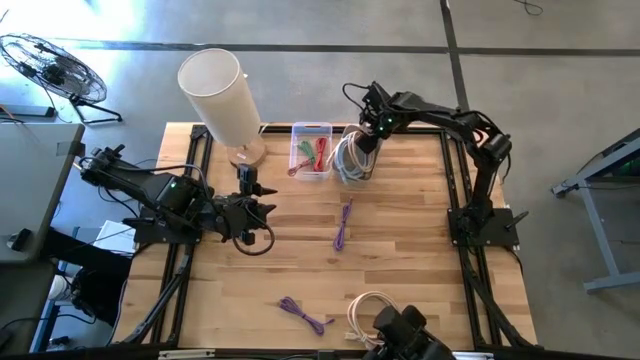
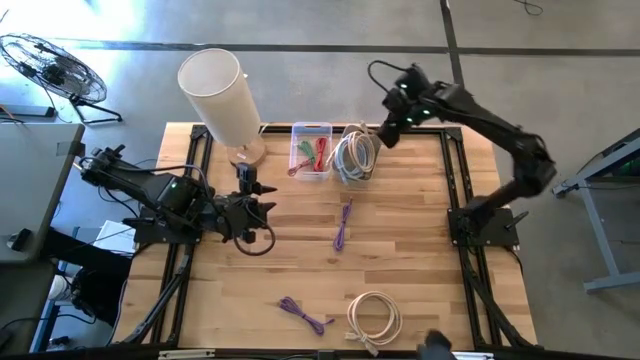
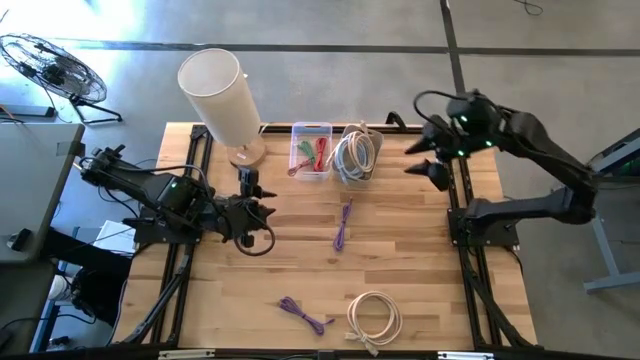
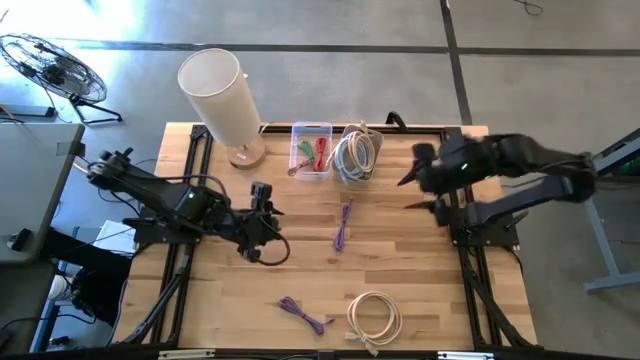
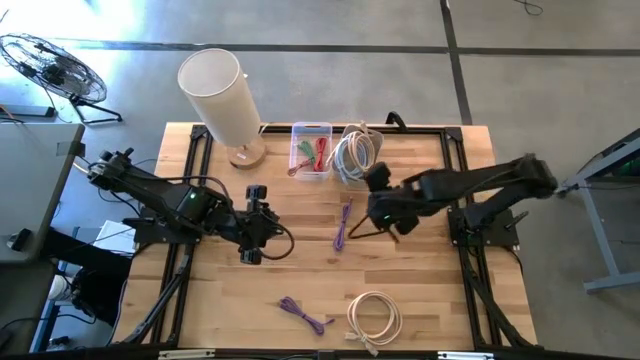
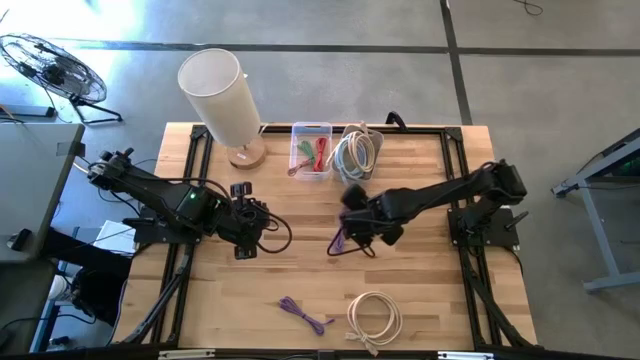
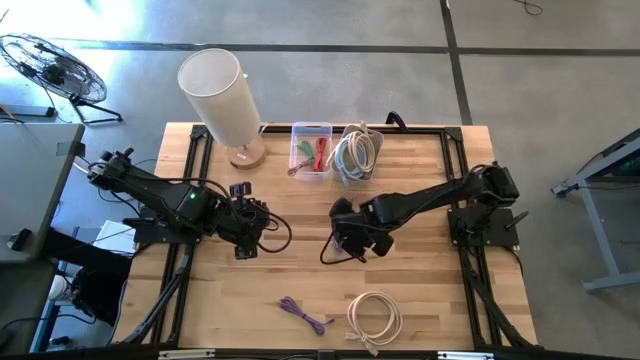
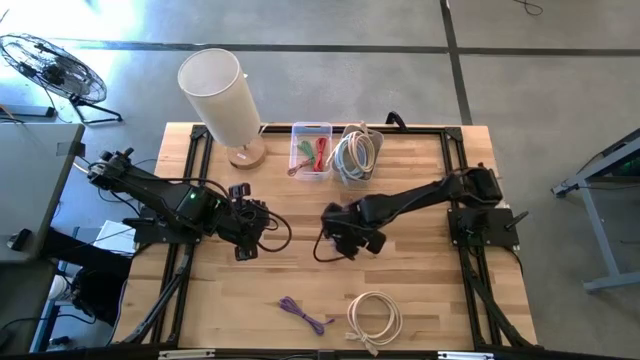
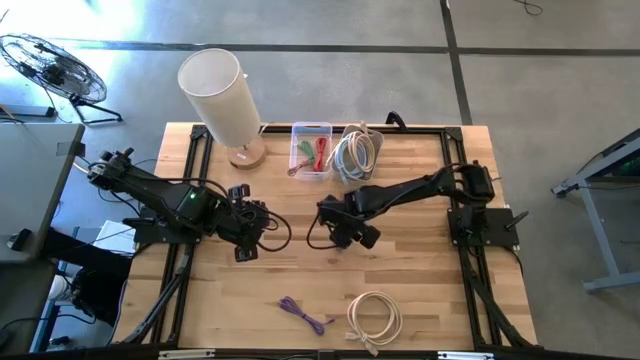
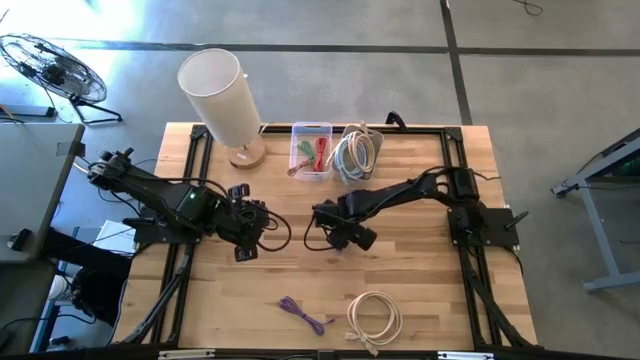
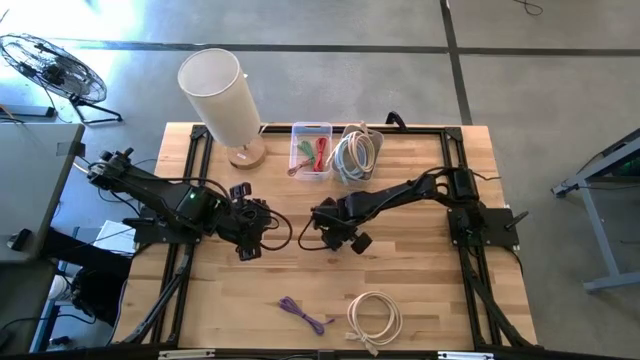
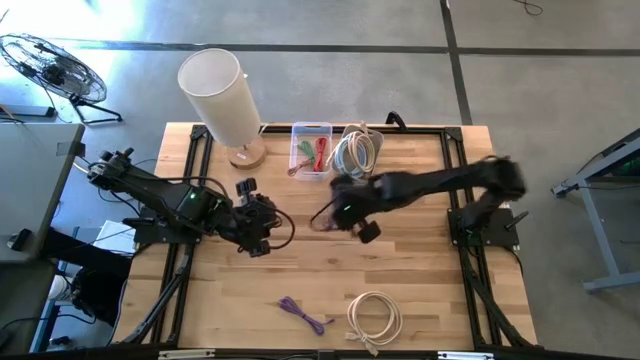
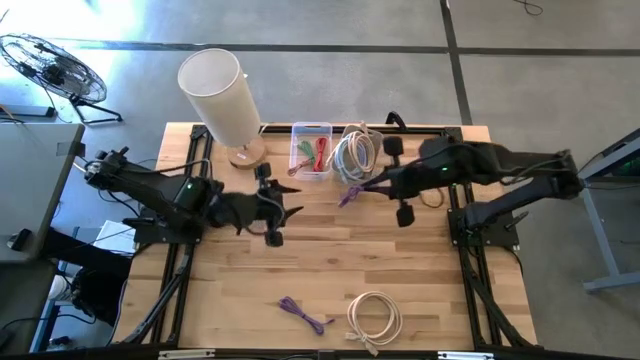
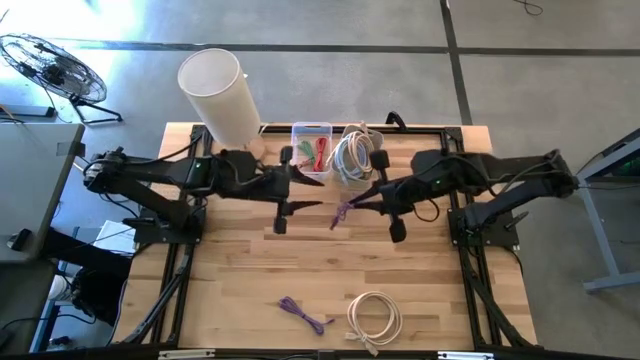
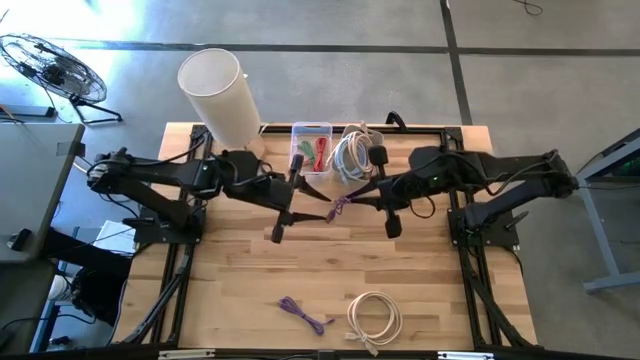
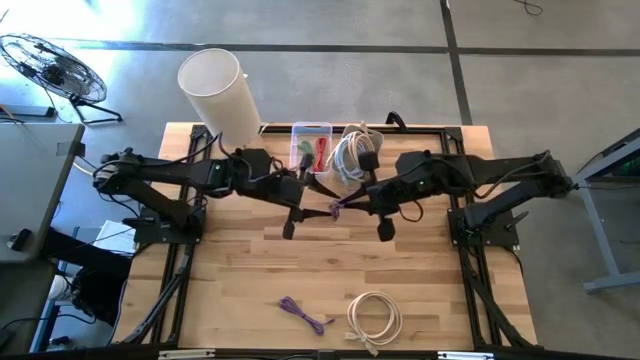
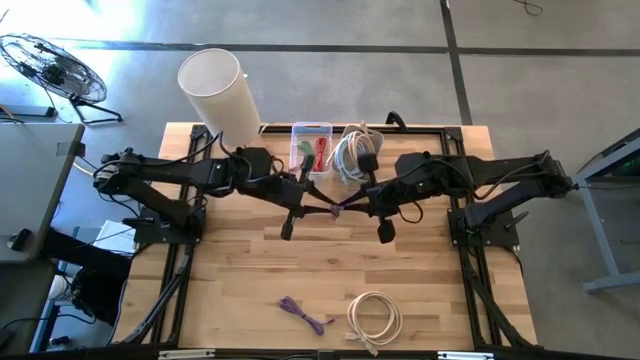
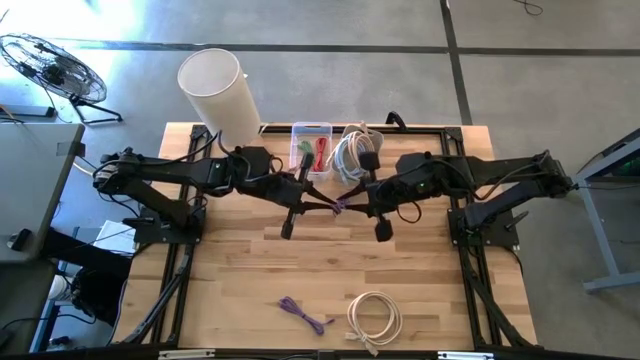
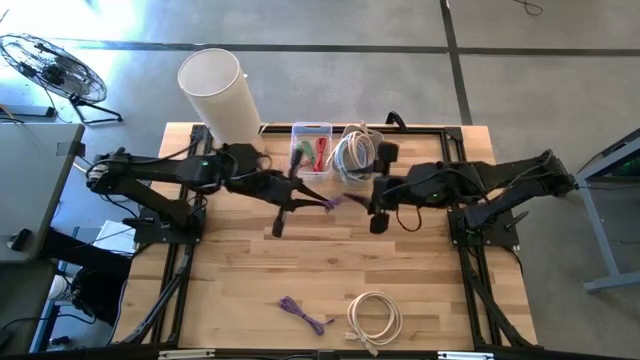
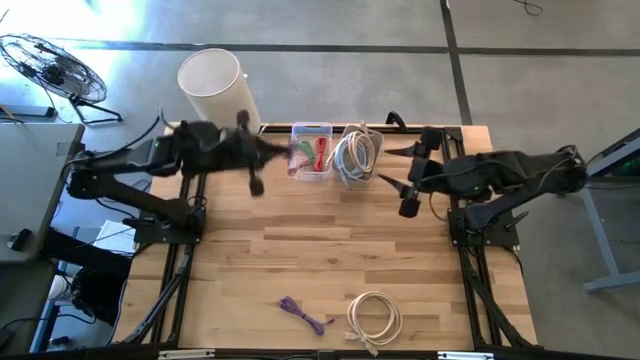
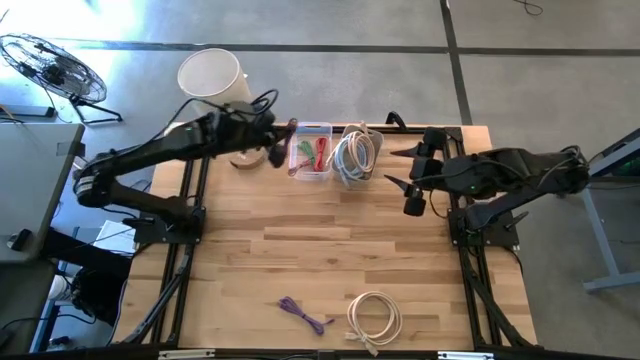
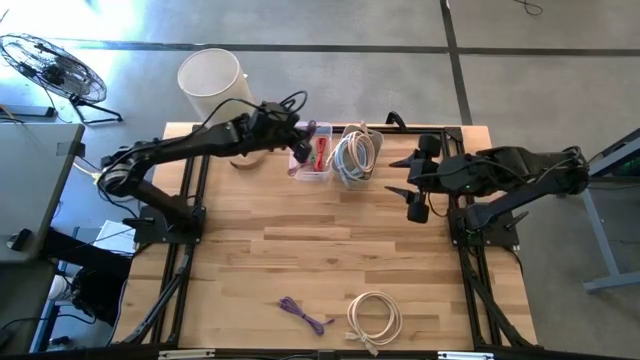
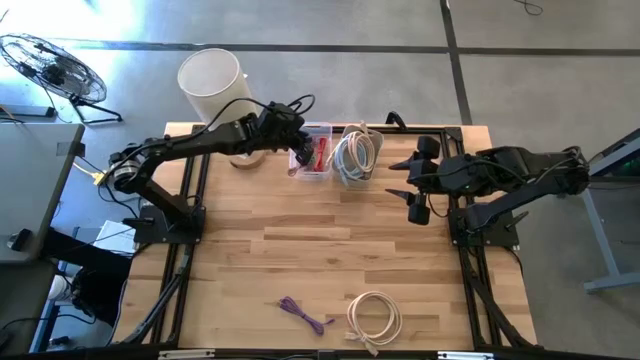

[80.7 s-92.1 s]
Task: Pick & Place USB Port
Put the top violet charger cable into the transparent bin

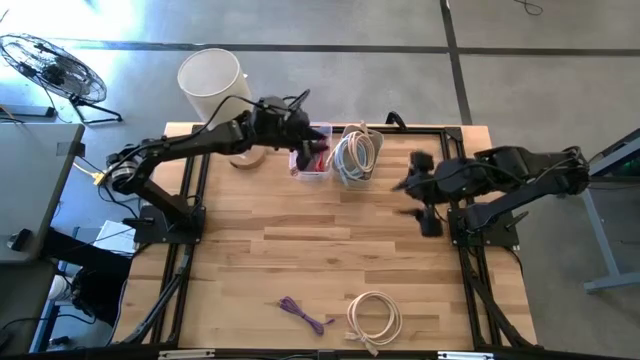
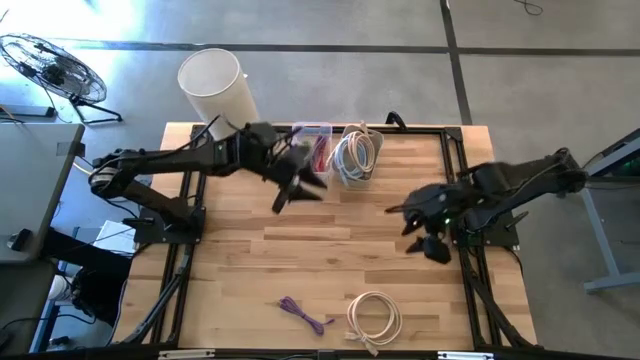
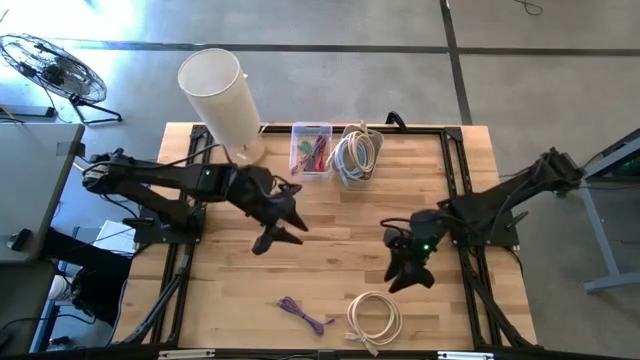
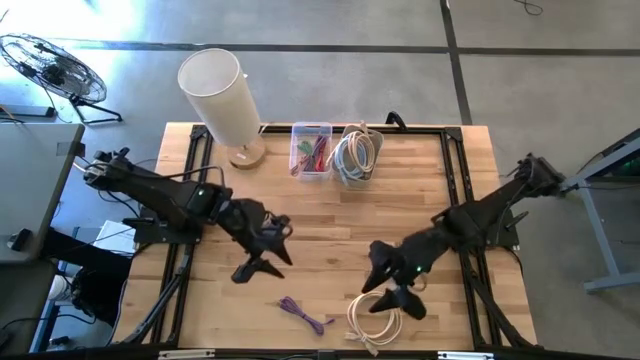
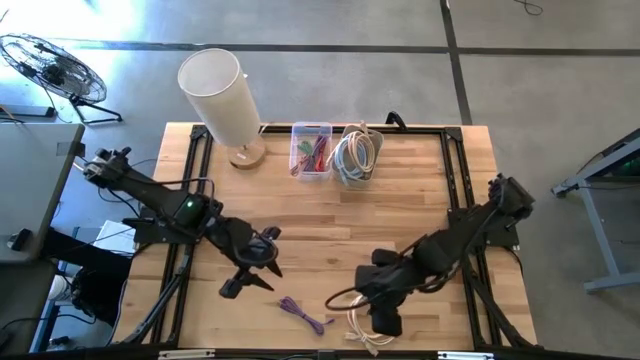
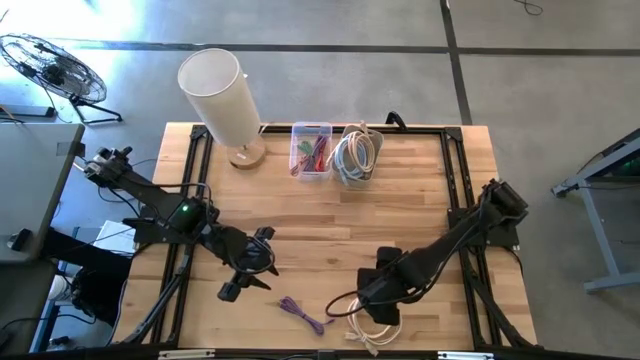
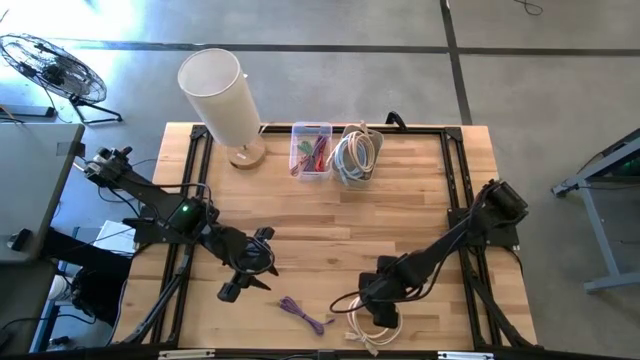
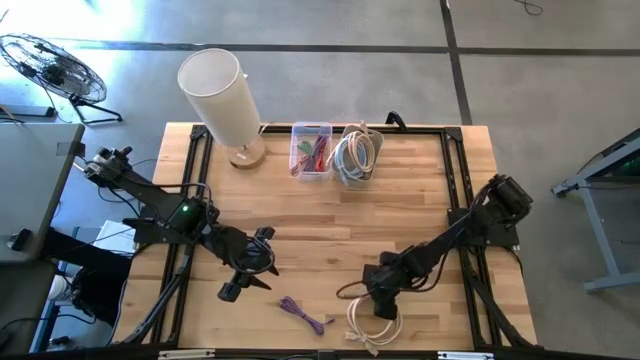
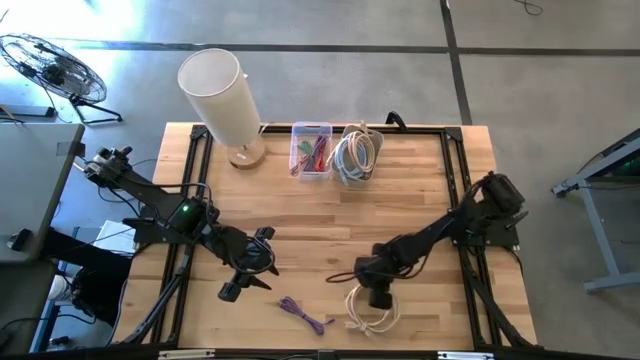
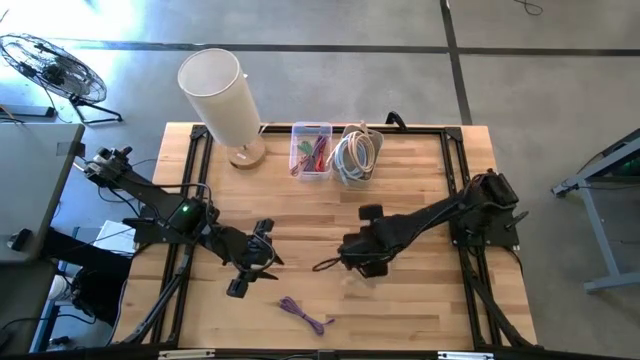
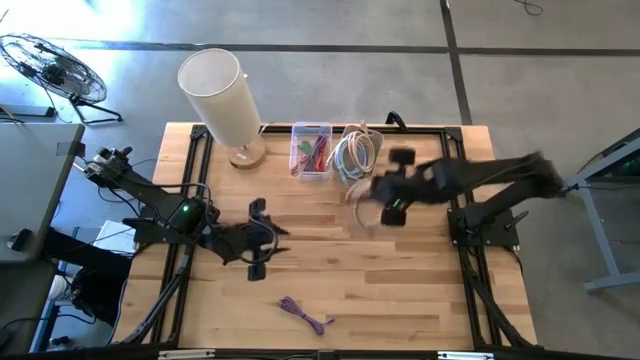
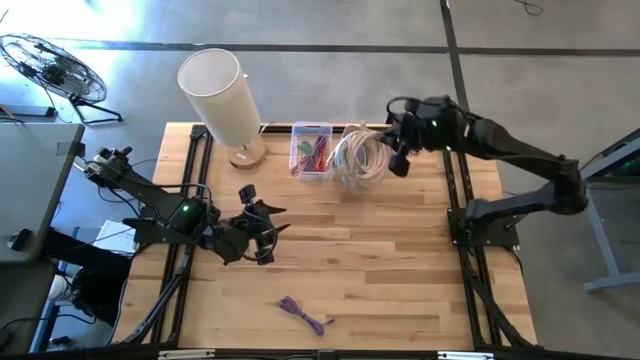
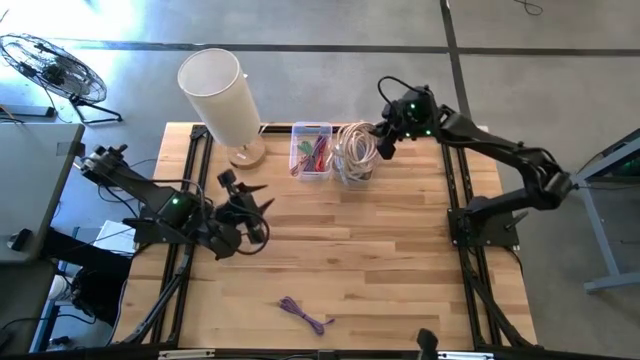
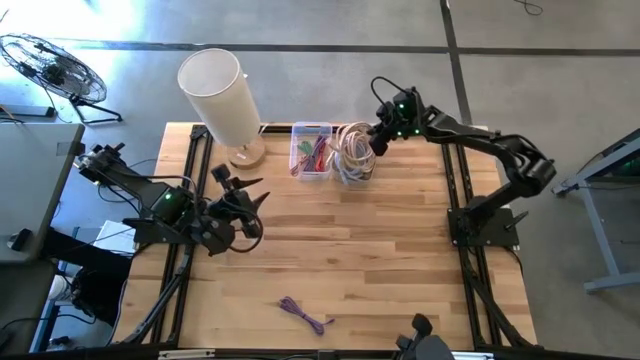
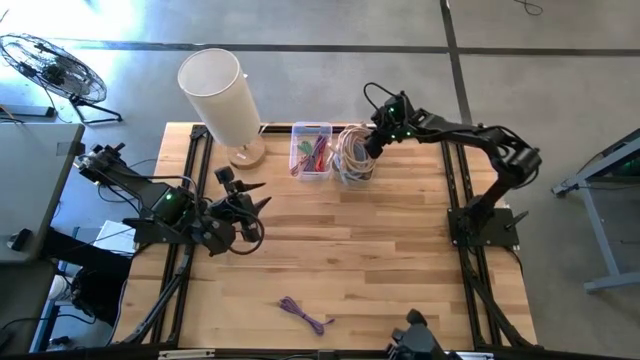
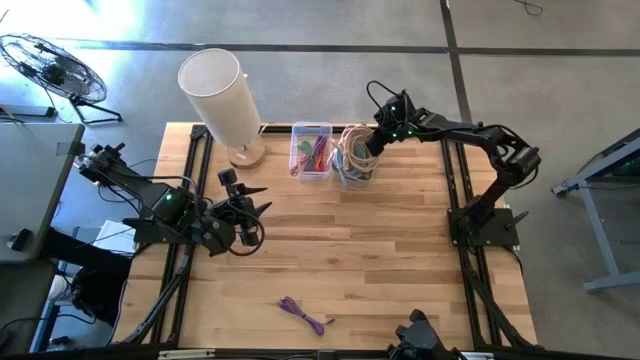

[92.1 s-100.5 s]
Put the light brown usb cable into the white bin

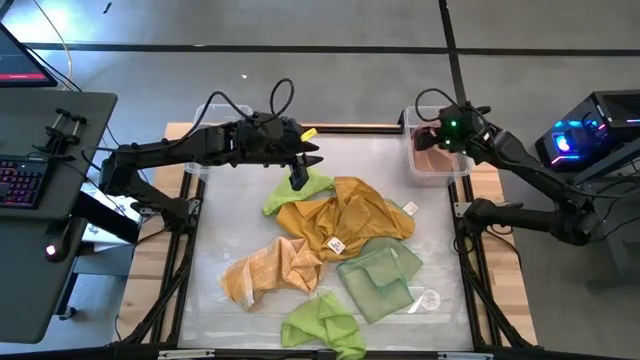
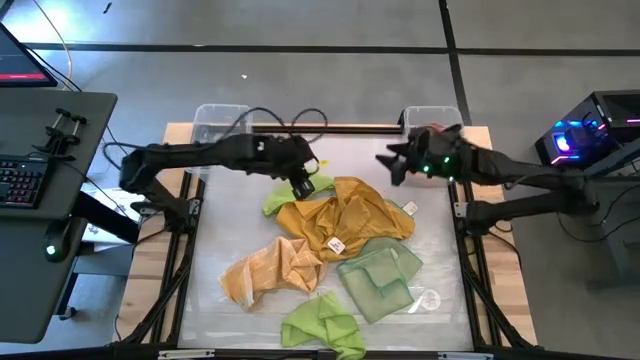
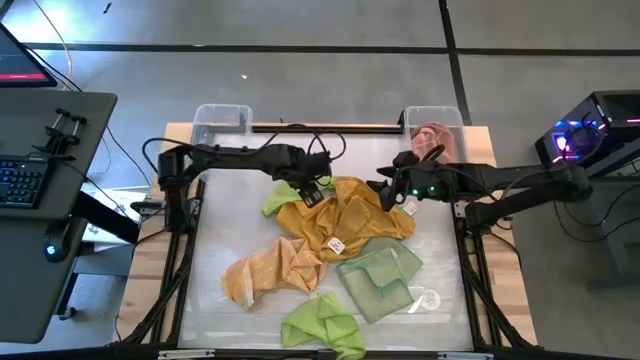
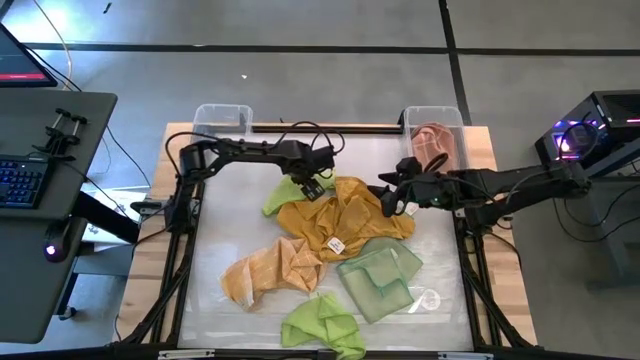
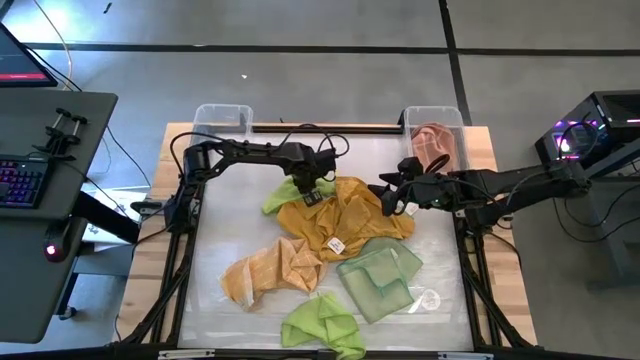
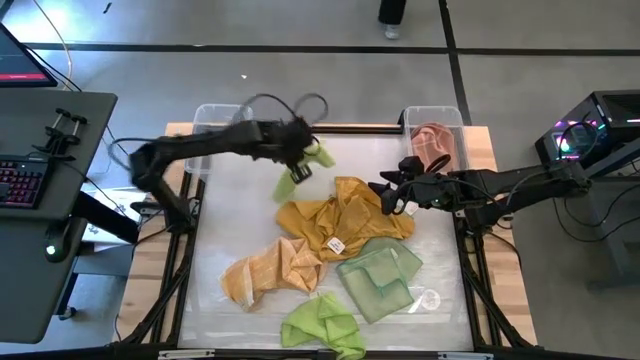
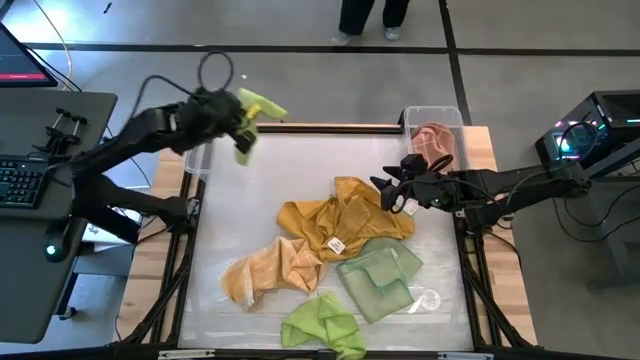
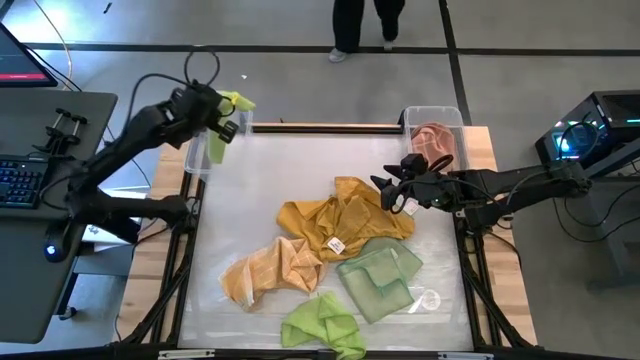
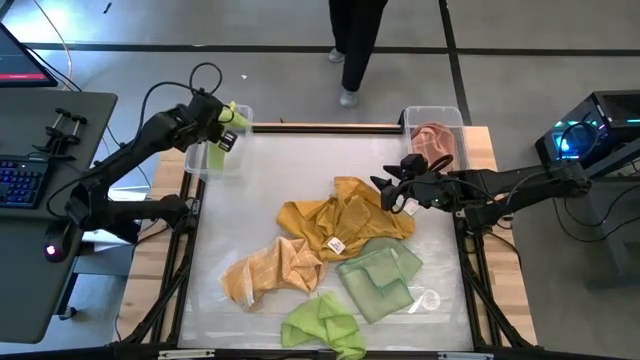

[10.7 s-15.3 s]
Task: Sort towels by color in basket
Put the light green microfiber towel into the left transparent bin
